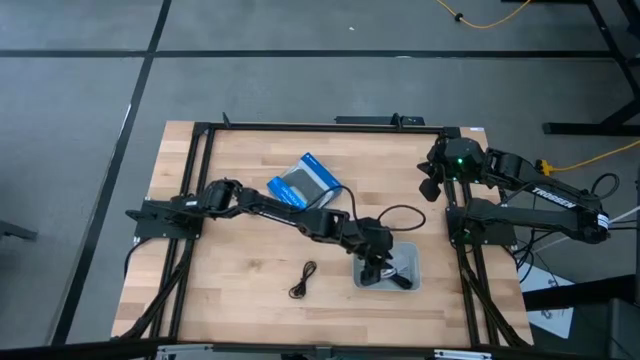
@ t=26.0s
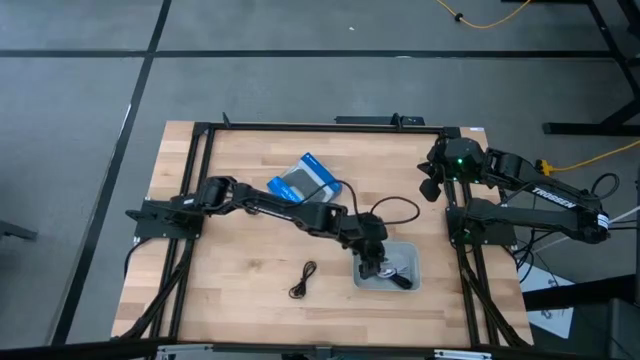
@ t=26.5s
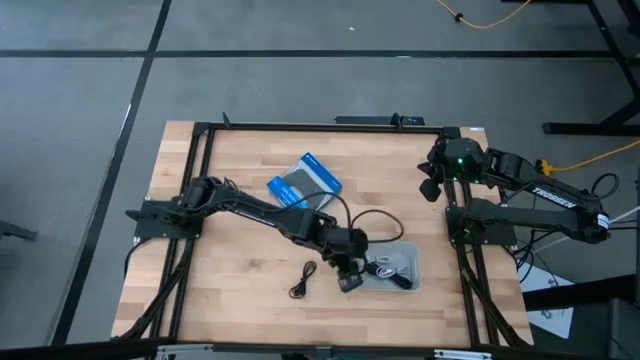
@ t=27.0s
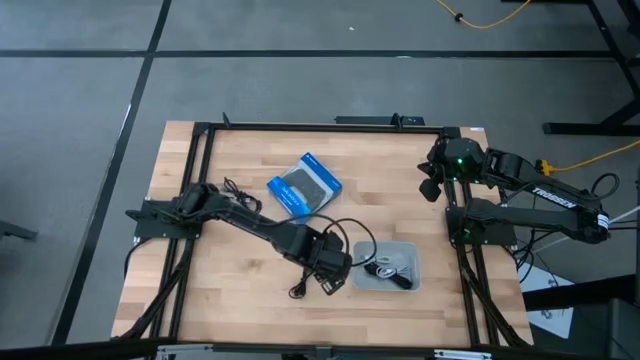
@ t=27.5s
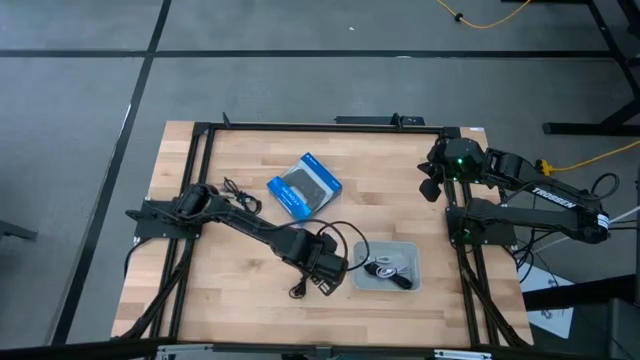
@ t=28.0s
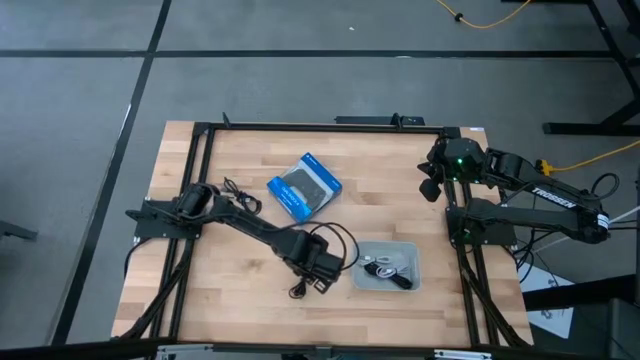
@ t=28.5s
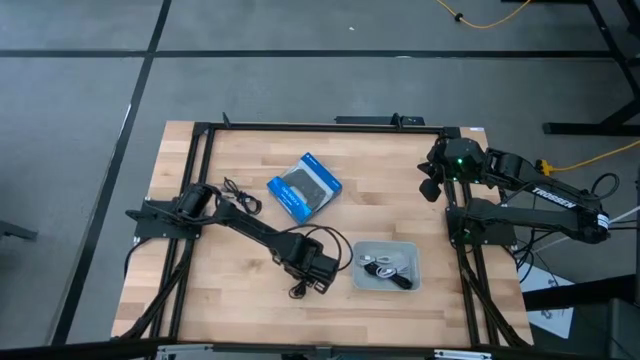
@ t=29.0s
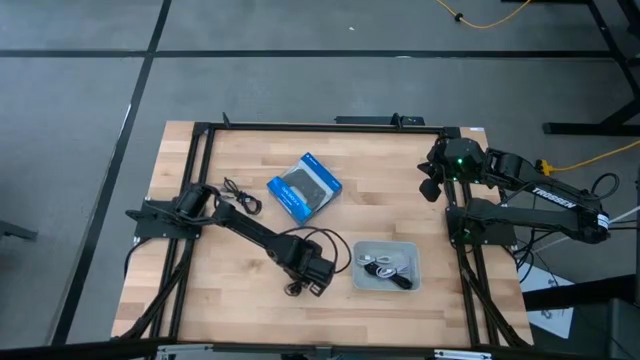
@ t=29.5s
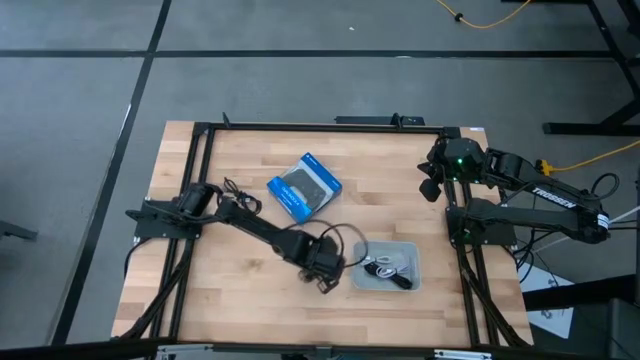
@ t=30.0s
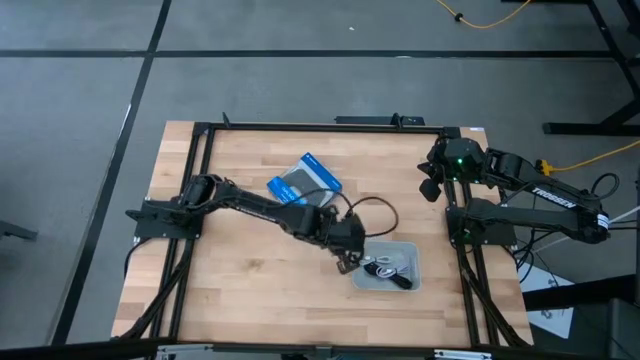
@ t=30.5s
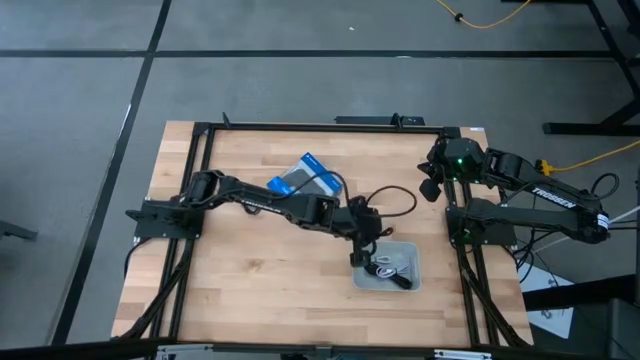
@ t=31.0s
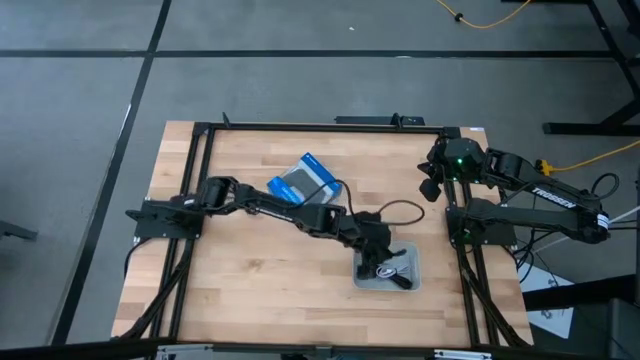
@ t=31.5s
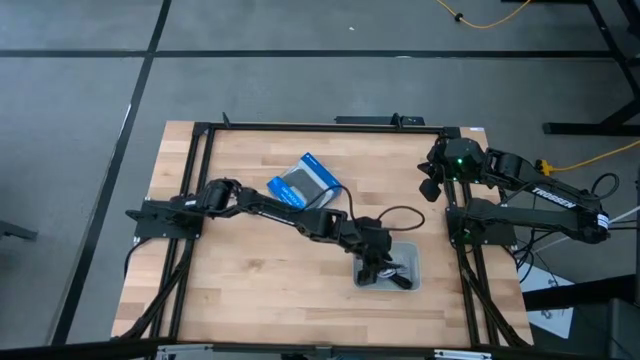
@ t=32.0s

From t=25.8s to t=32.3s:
Task: Pick and place USB-C Cables
Put the bottom black usb cable into the gray bin

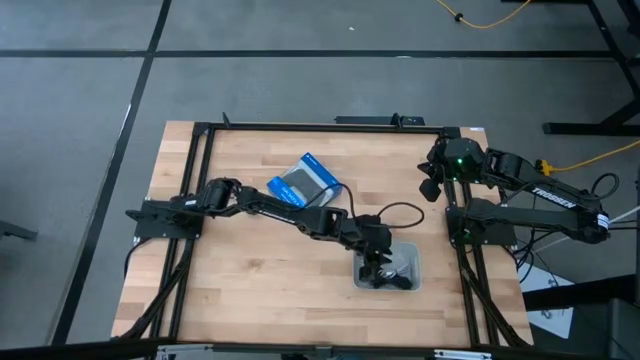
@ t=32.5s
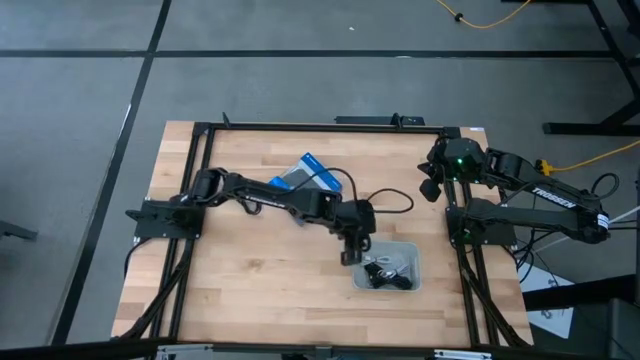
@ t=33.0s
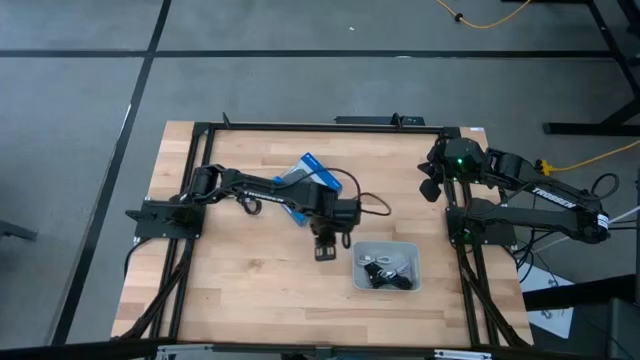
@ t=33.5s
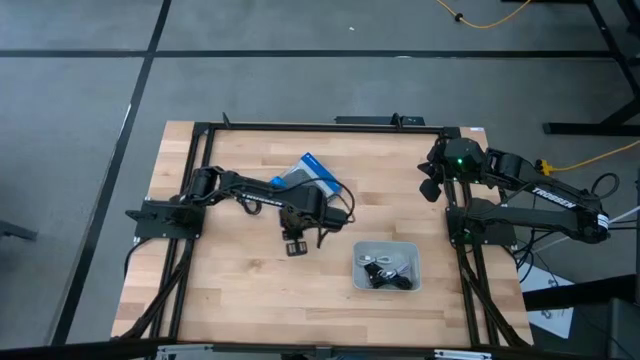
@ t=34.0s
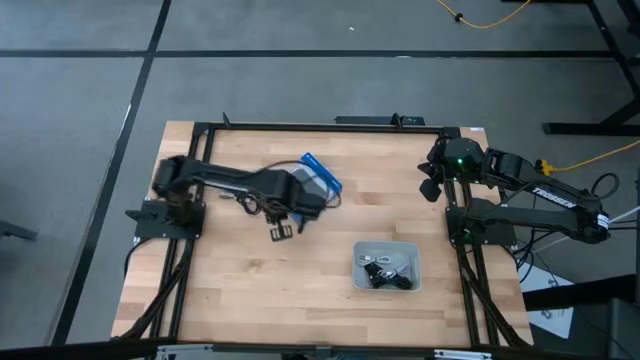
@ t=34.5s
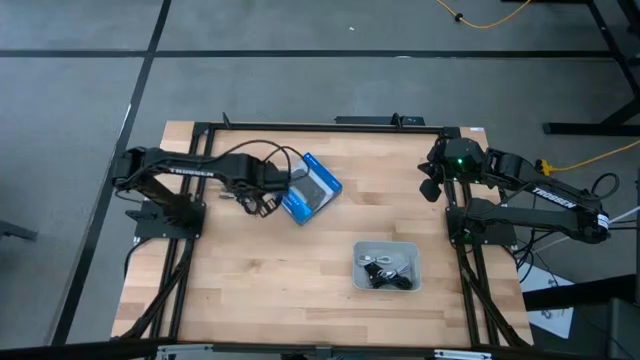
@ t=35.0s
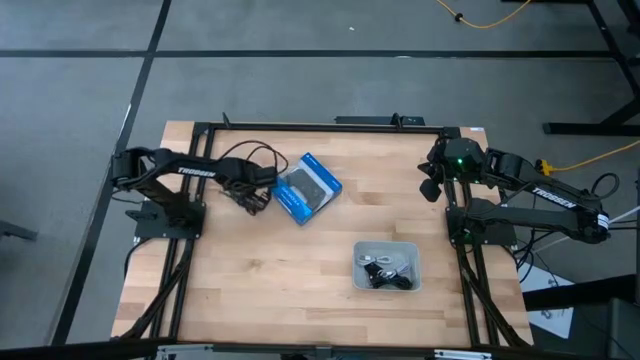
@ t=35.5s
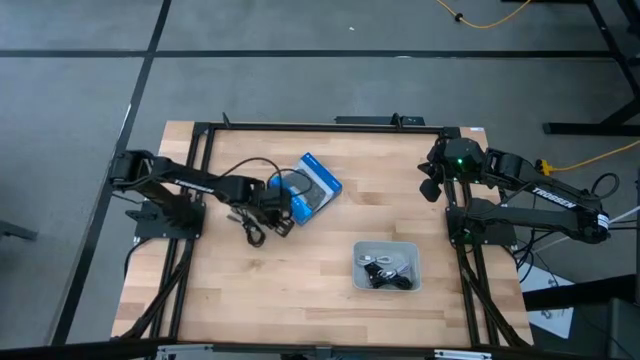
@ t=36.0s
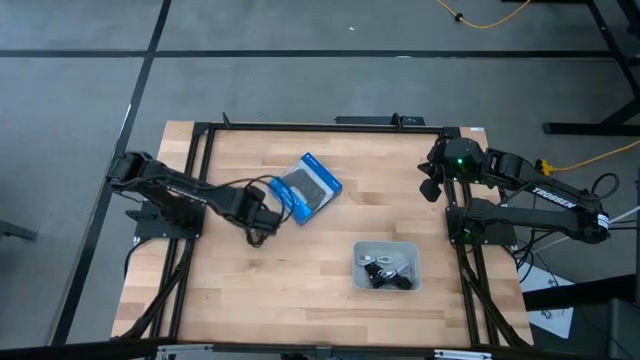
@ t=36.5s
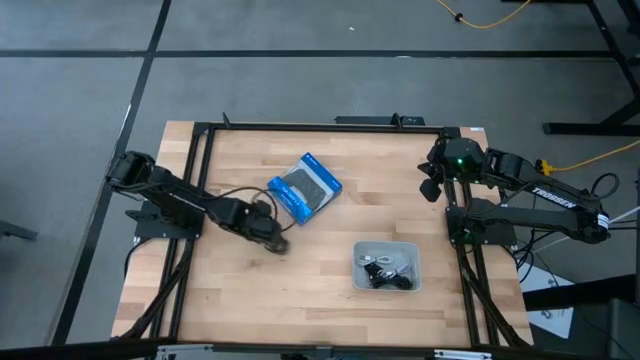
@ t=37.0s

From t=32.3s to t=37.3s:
Put the black usb cable into the gray bin

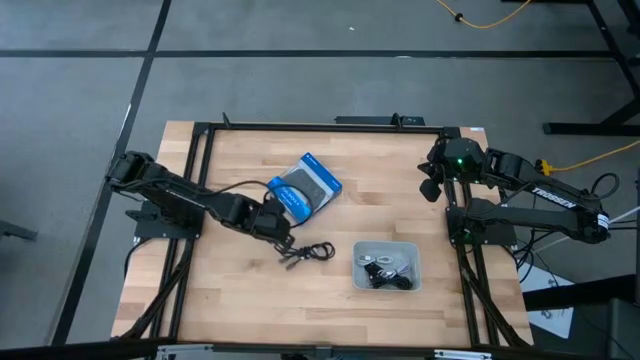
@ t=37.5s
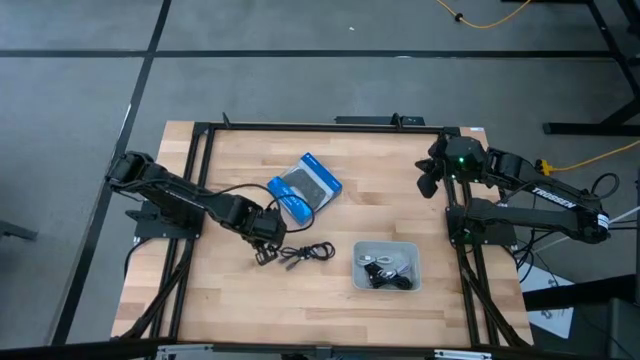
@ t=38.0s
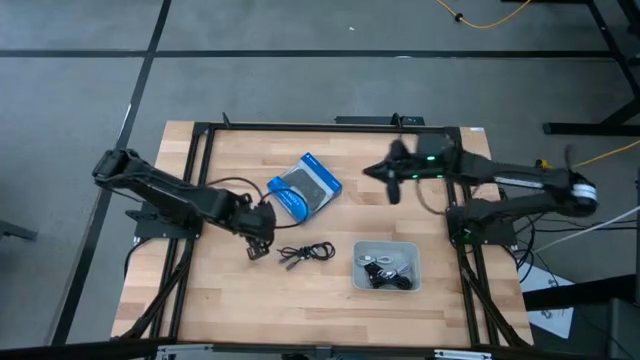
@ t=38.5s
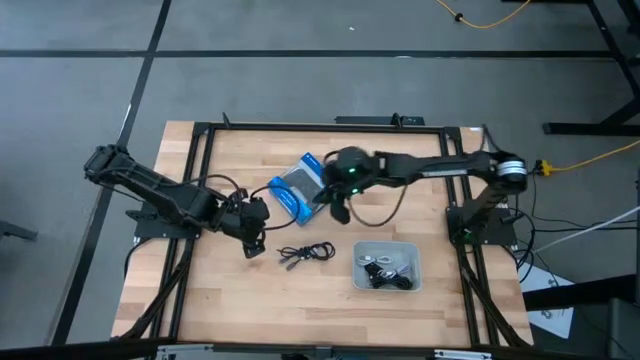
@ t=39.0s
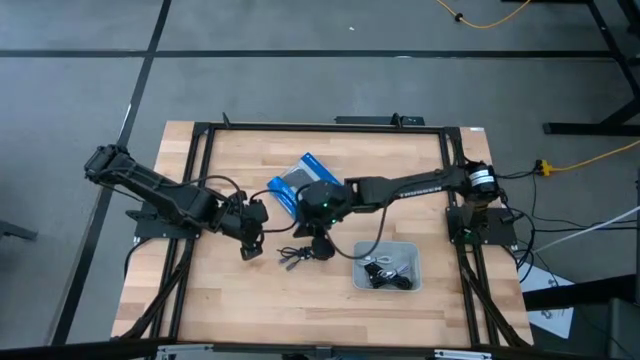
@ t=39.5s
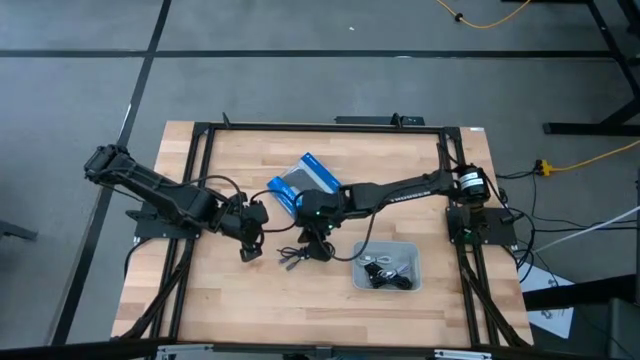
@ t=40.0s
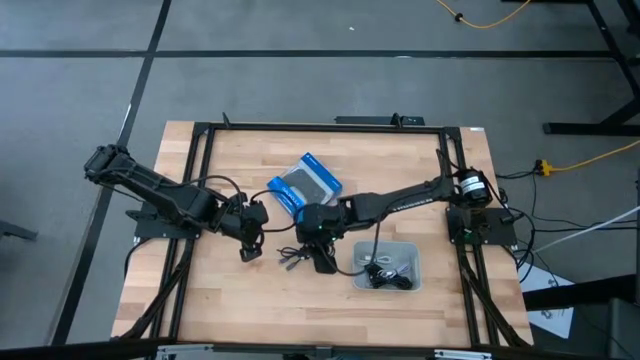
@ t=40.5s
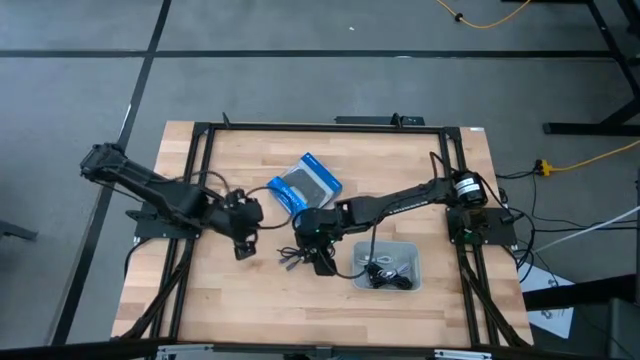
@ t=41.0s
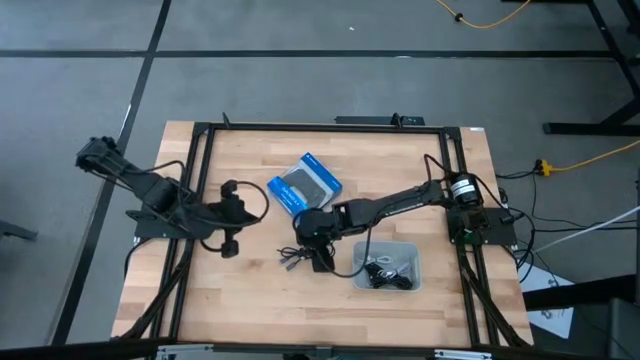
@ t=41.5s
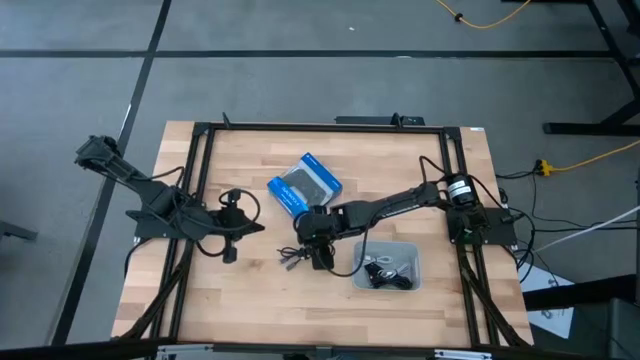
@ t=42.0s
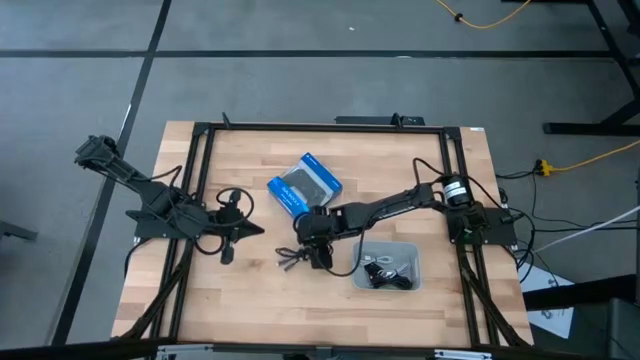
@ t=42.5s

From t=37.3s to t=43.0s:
Put the black usb cable into the gray bin

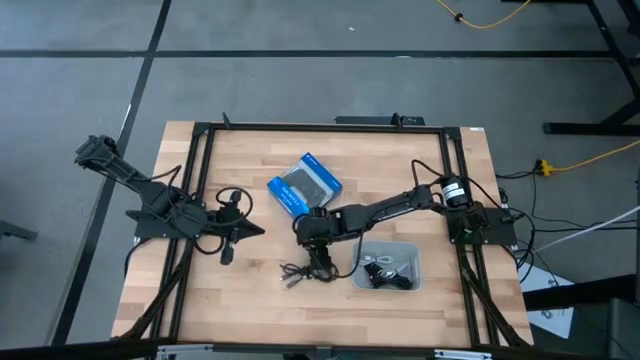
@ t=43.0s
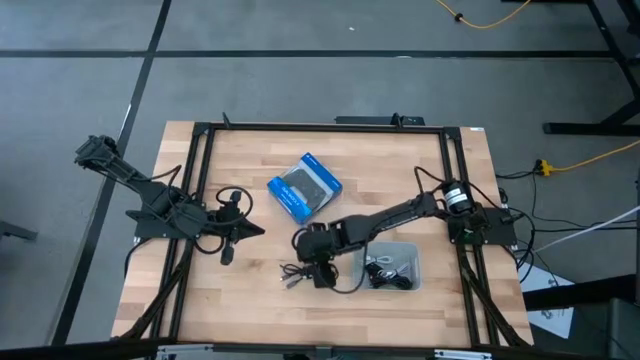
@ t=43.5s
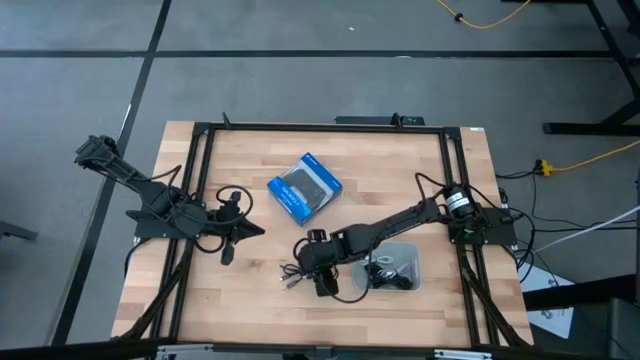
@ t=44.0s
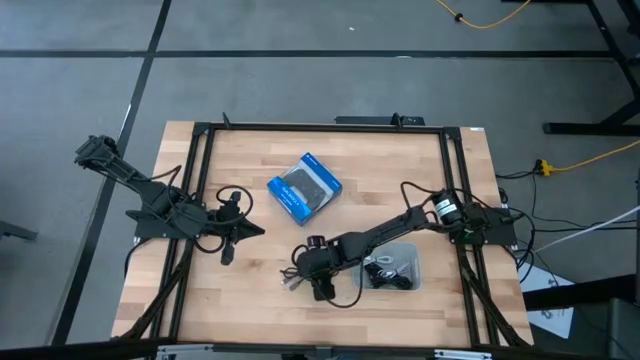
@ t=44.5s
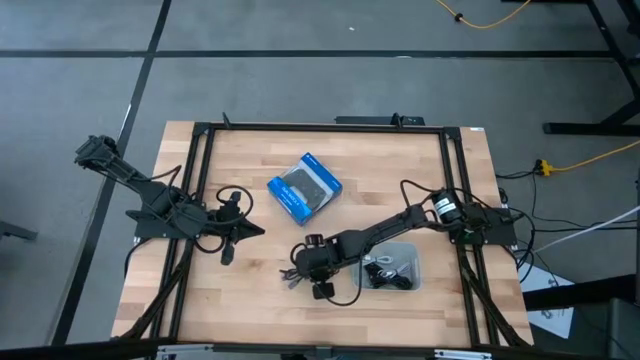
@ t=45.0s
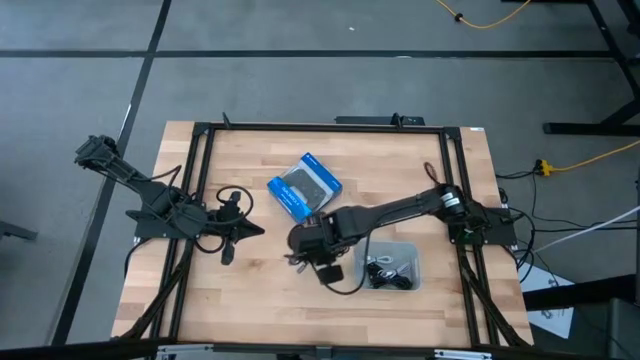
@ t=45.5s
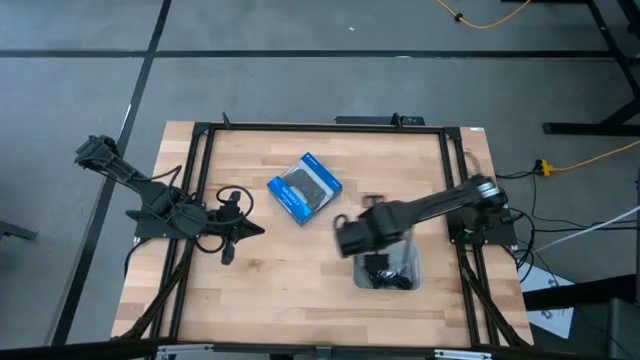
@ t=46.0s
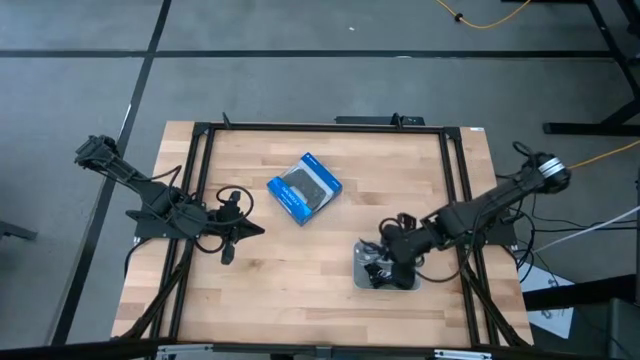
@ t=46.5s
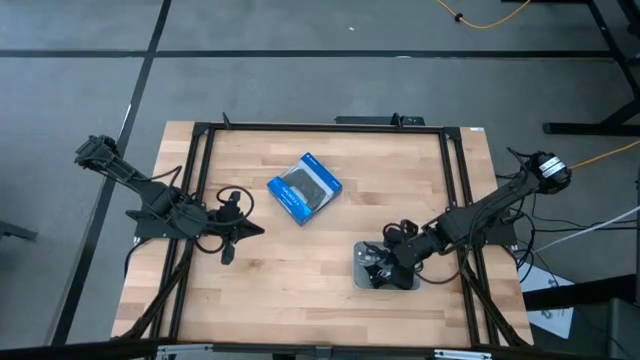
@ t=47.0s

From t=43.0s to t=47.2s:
Put the black usb cable into the gray bin
